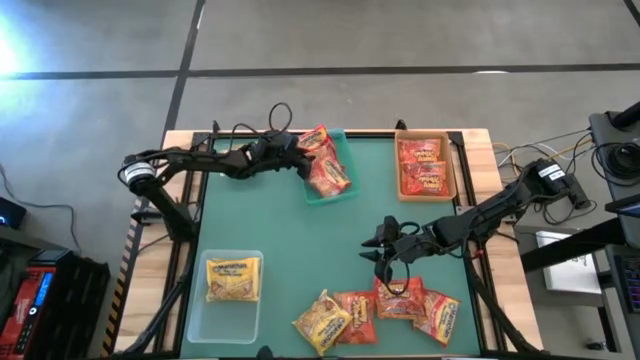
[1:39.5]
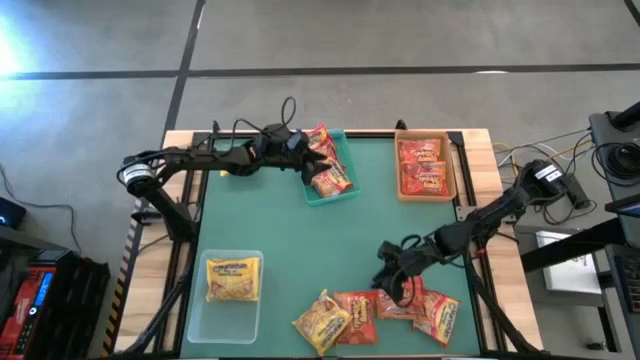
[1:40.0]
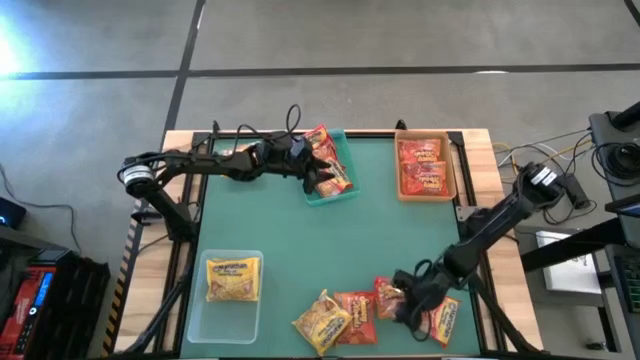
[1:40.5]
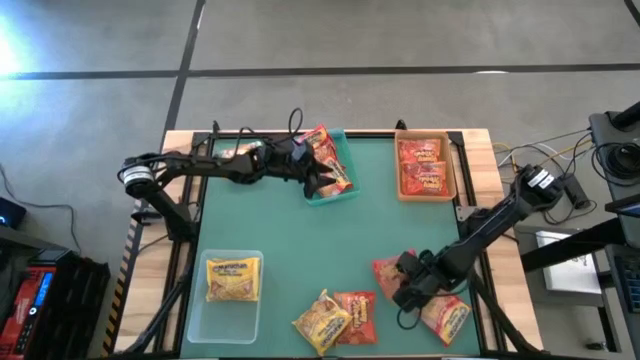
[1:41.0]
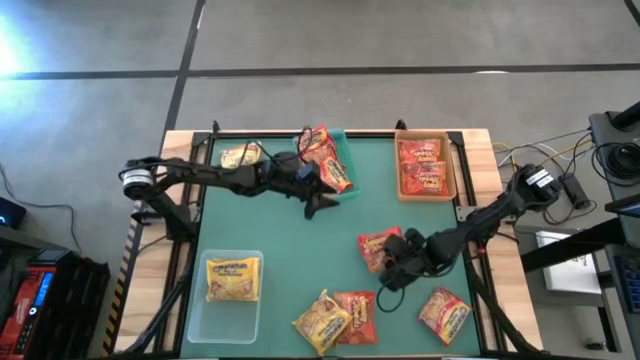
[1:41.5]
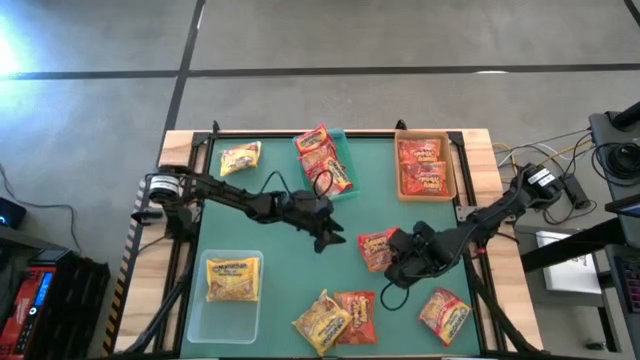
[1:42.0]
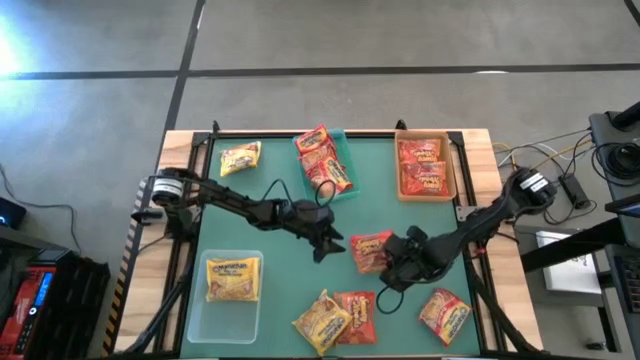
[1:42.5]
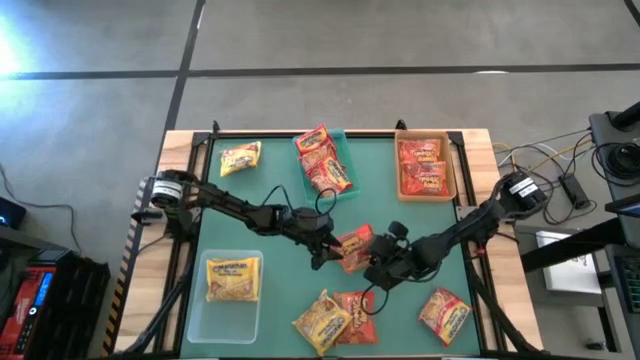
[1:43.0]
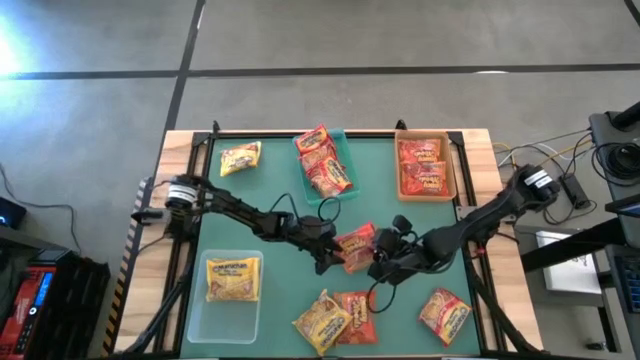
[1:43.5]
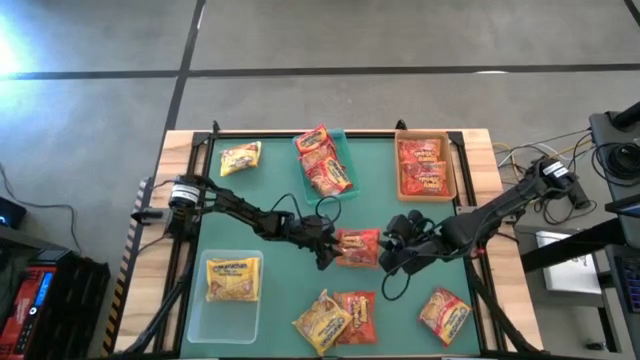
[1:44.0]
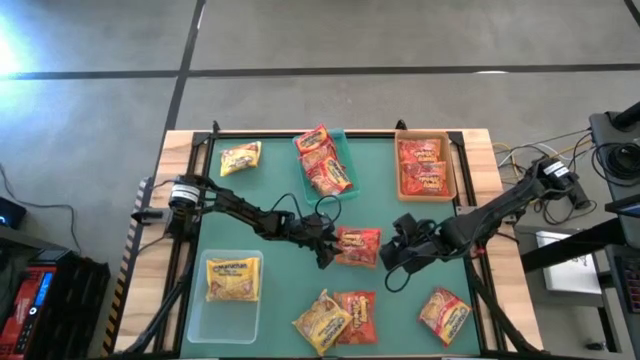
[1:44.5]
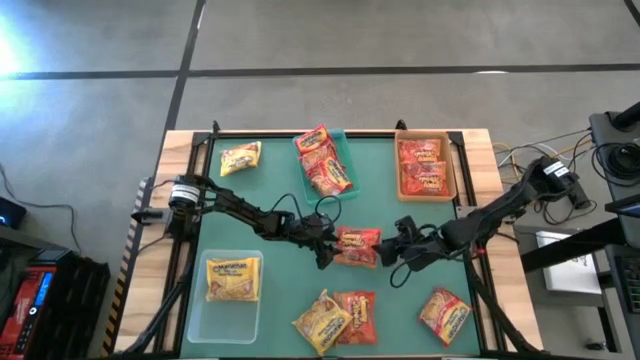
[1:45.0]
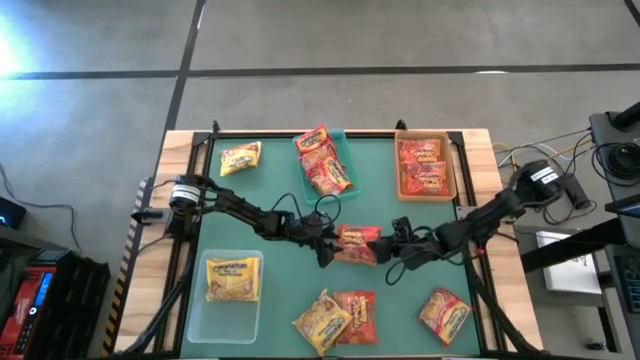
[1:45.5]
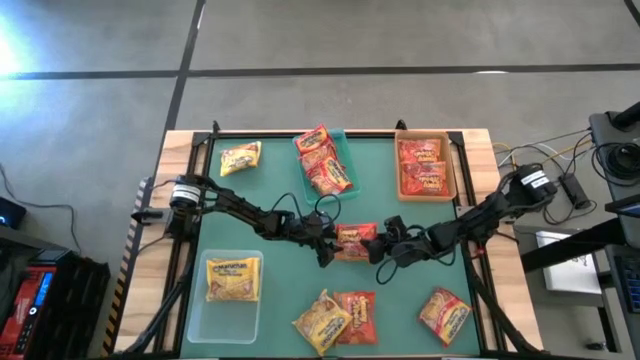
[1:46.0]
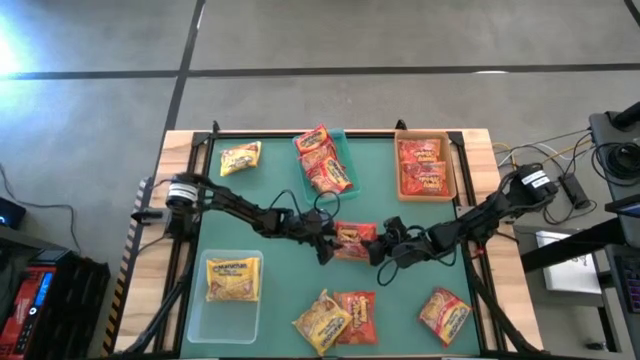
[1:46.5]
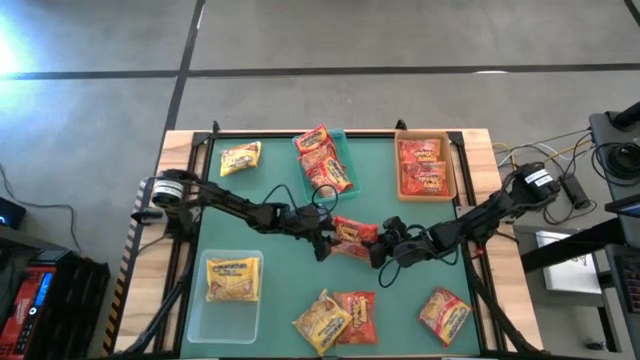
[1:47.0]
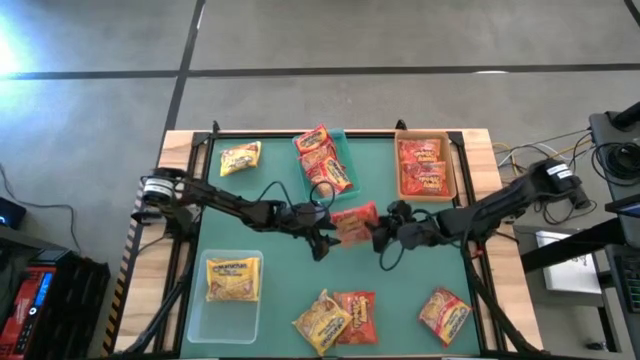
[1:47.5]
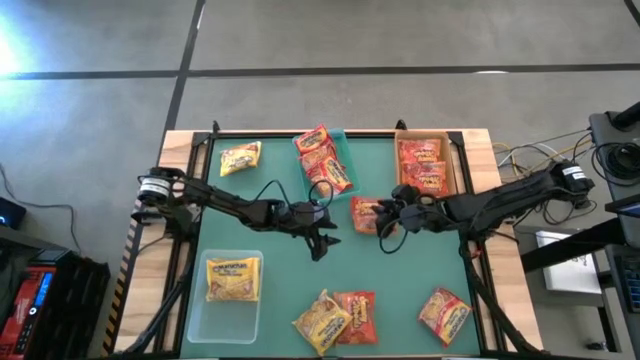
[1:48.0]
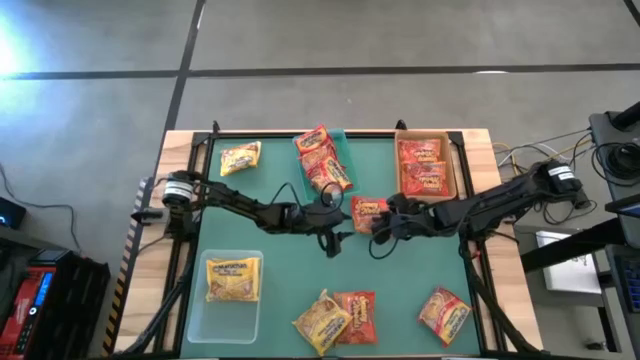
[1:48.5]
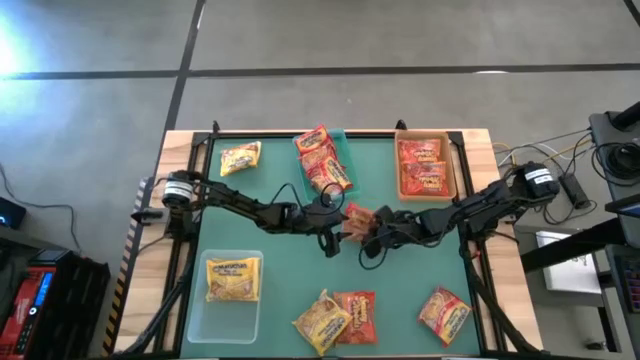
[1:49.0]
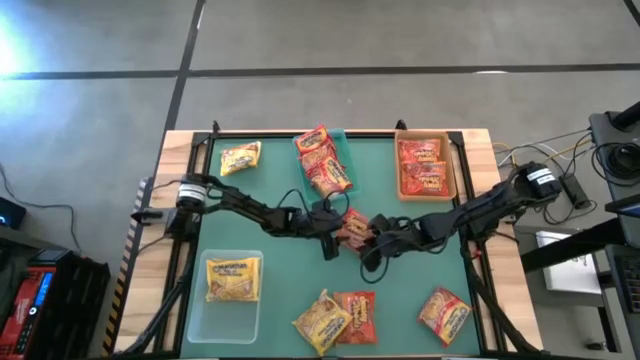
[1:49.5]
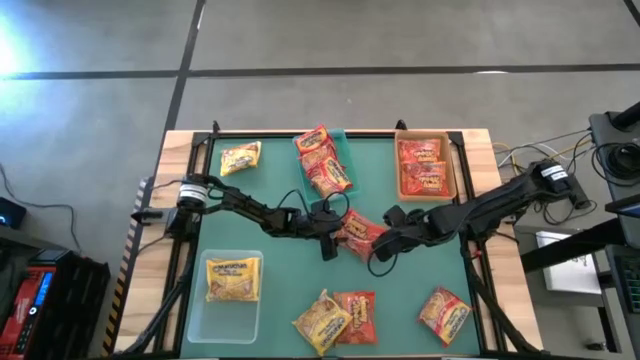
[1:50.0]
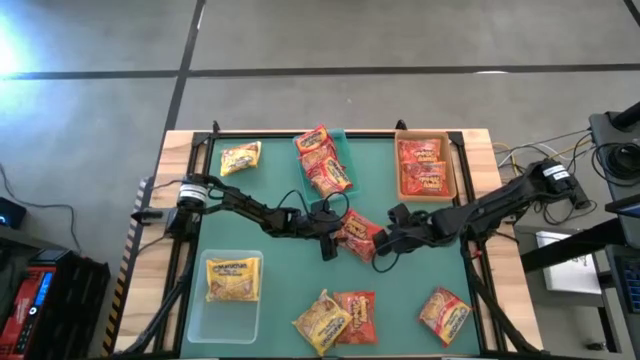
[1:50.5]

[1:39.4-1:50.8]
Task: Sort Maruchan noodles
Put the right orange noodle pack into the orange bin

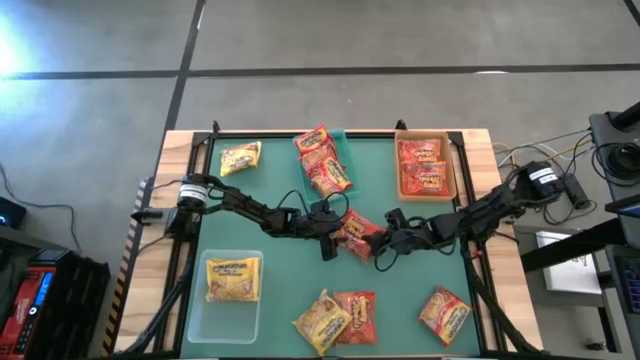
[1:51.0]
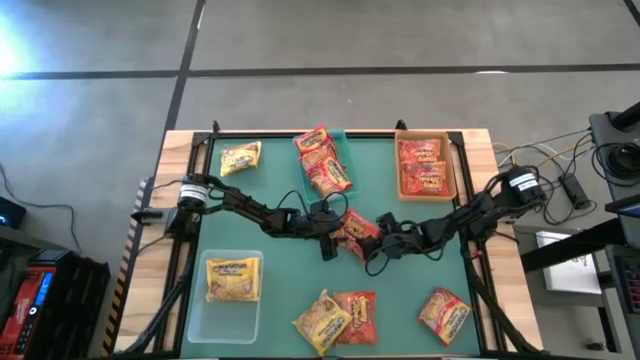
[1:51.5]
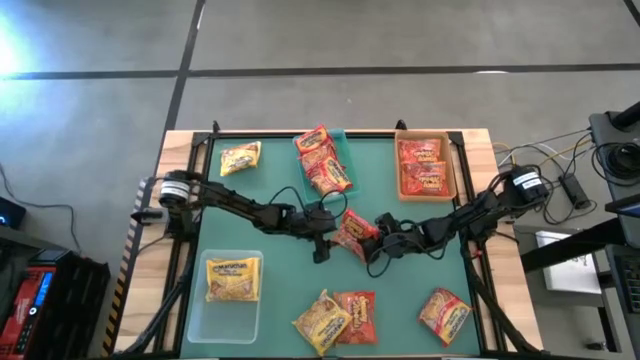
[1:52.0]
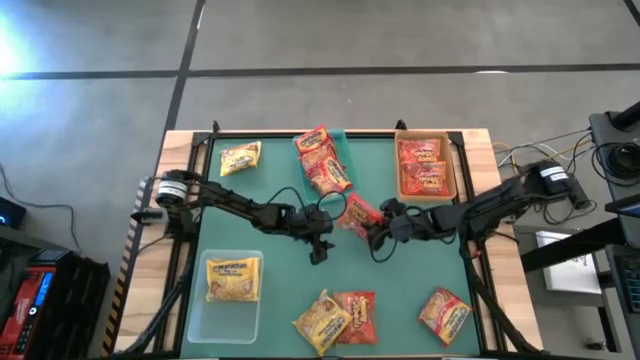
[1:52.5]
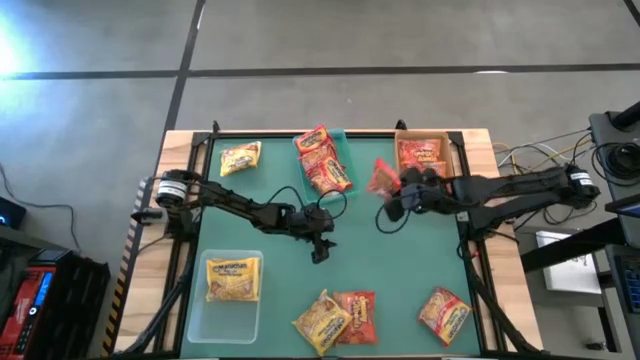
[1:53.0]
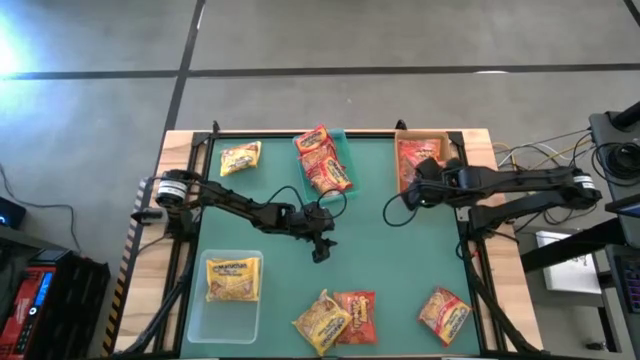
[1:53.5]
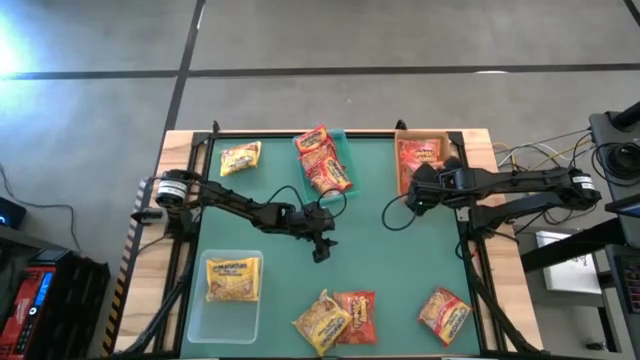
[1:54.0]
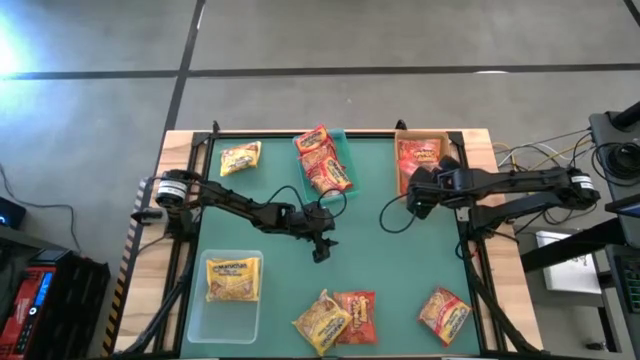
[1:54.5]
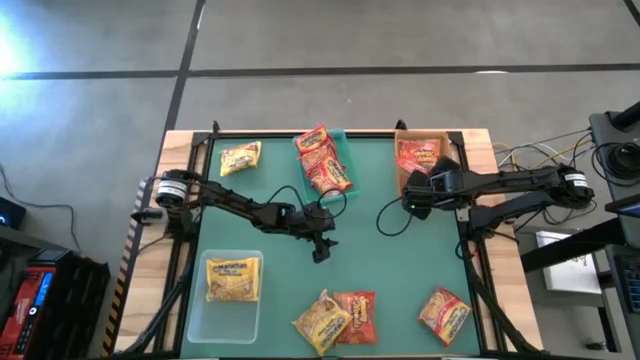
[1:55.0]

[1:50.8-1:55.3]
Put the right orange noodle pack into the orange bin

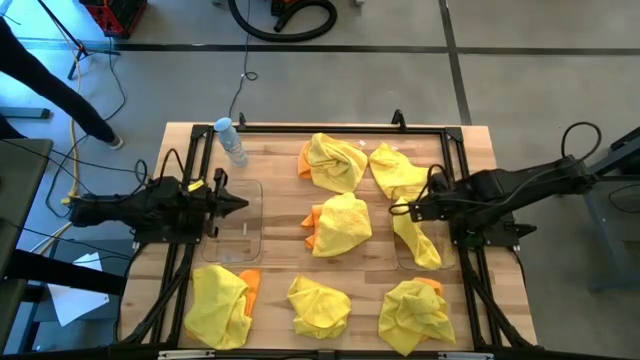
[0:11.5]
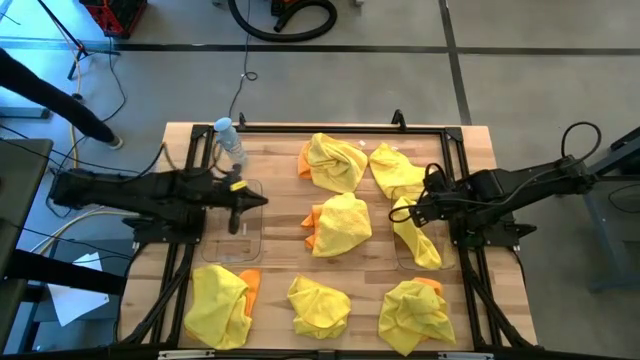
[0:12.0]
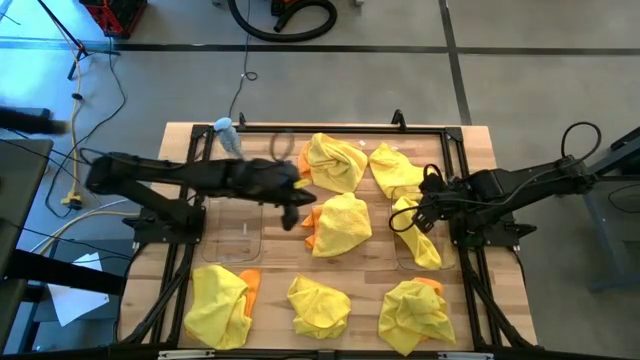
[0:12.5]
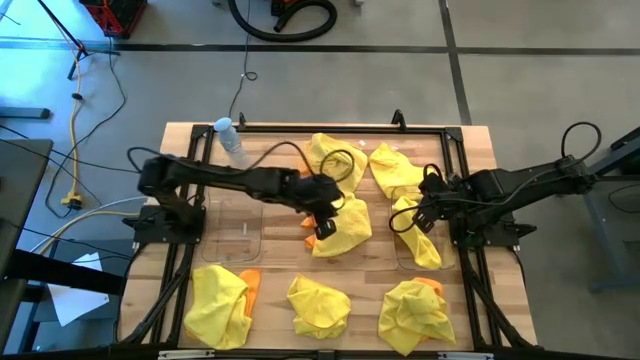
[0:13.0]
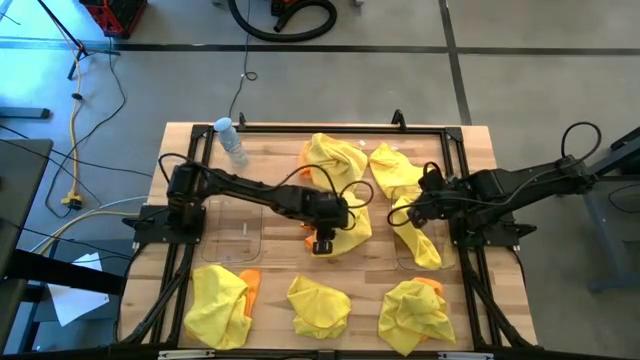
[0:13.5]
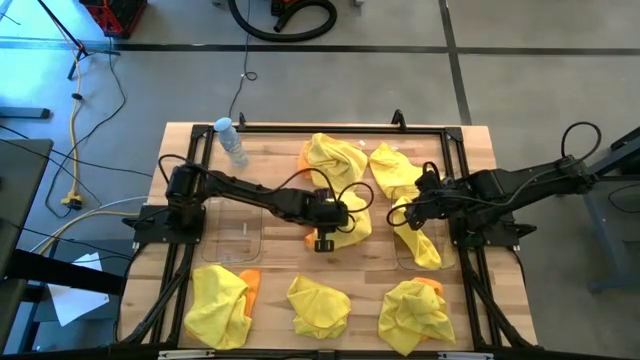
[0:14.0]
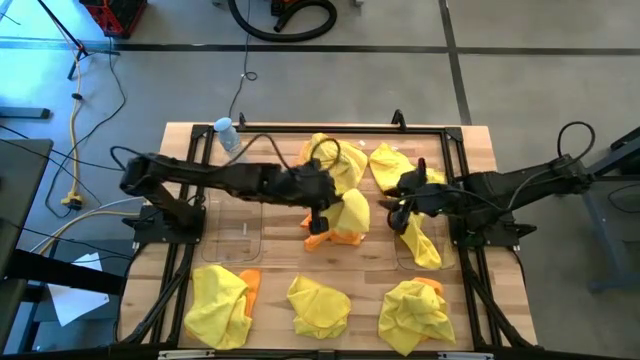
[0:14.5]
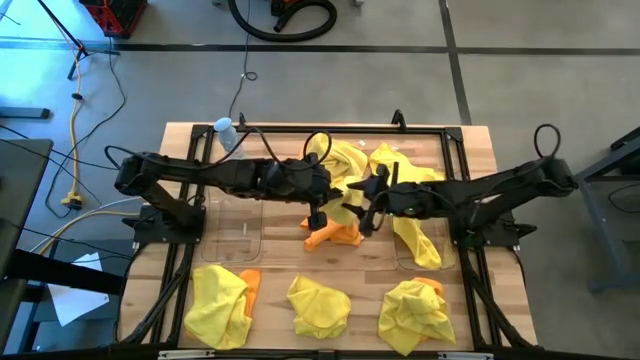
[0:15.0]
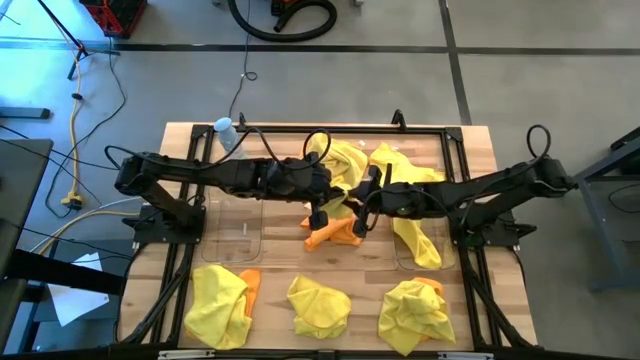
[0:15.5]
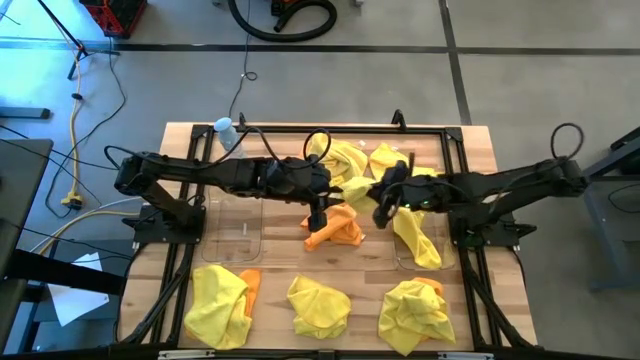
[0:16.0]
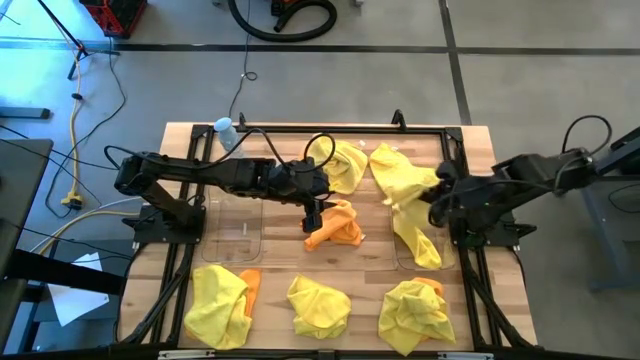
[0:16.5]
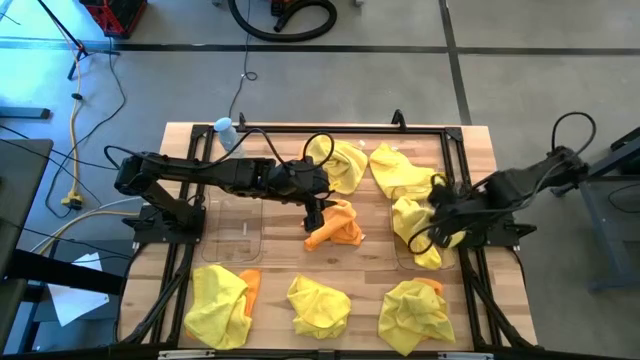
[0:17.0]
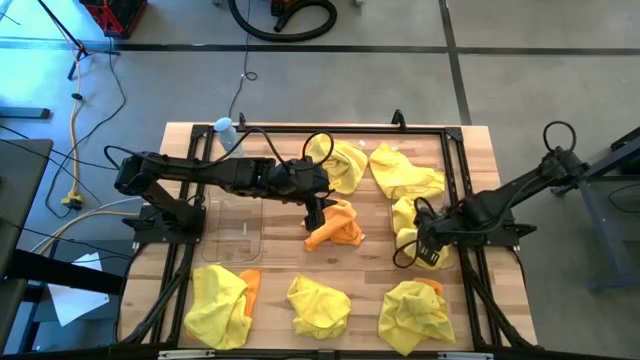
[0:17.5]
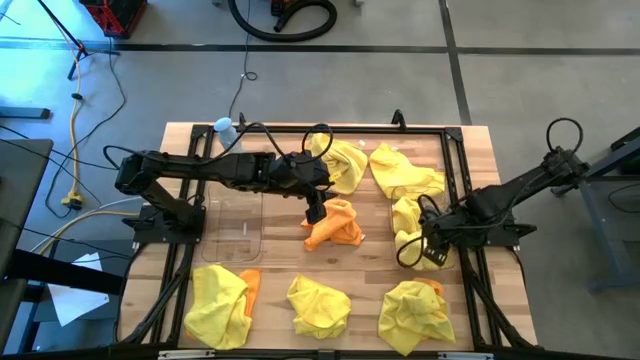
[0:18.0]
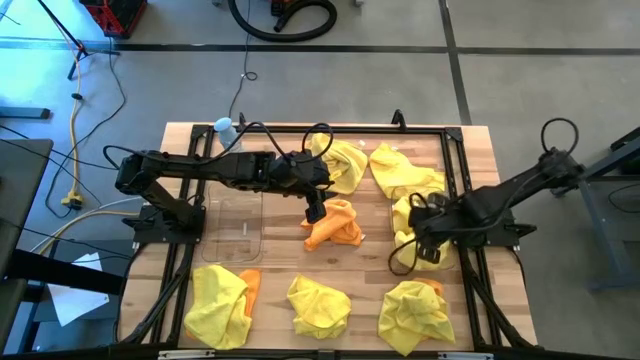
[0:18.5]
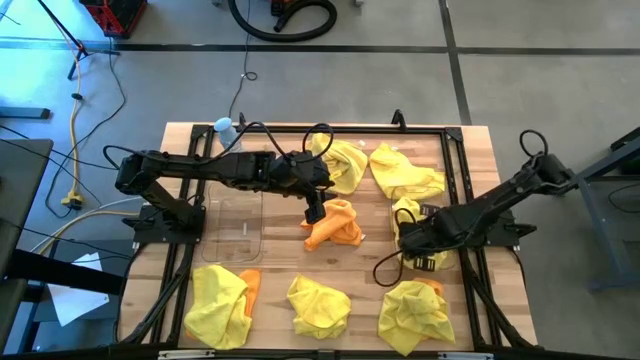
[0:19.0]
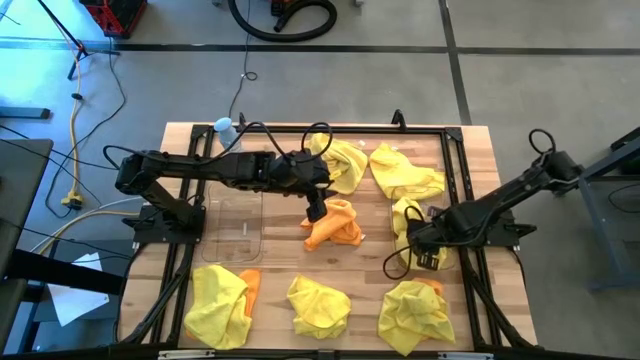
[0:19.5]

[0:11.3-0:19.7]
Task: Sort microfiber towel by color & place in baskets
Put the yellow towel into the right transparent bin
